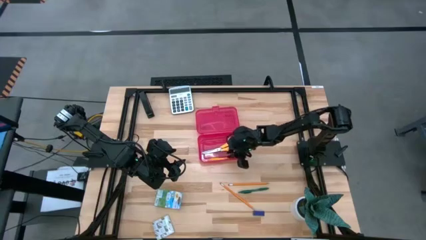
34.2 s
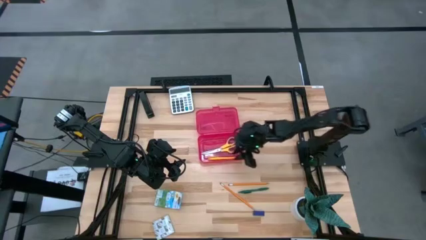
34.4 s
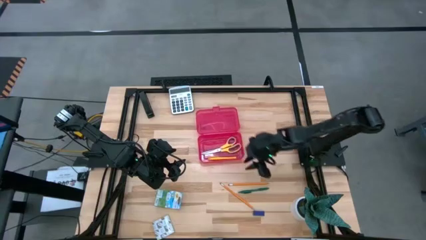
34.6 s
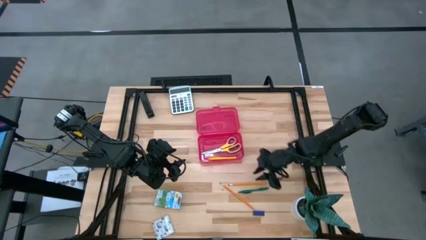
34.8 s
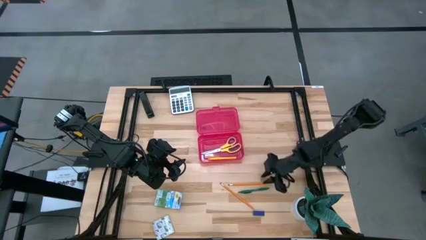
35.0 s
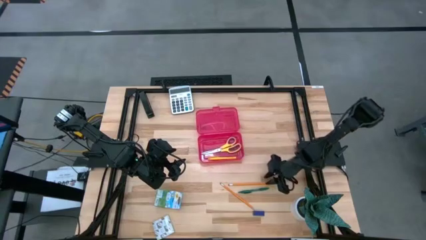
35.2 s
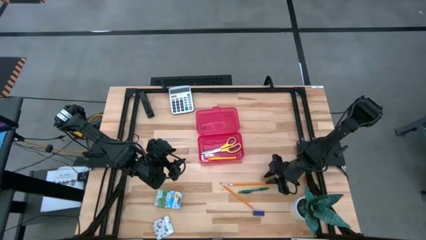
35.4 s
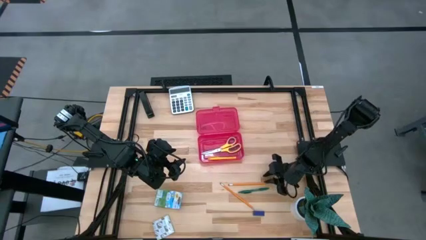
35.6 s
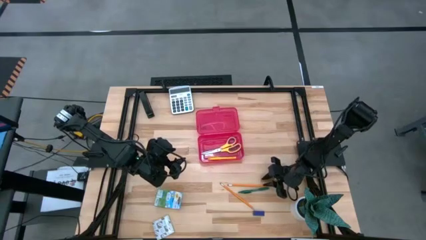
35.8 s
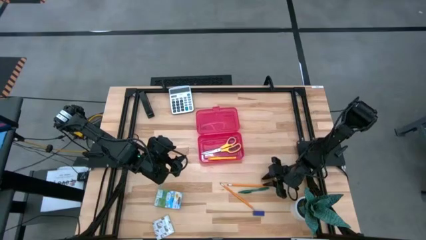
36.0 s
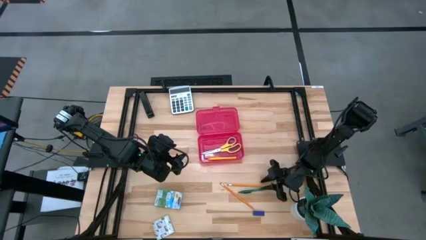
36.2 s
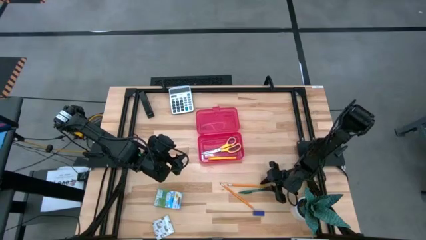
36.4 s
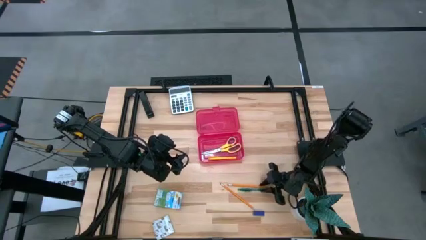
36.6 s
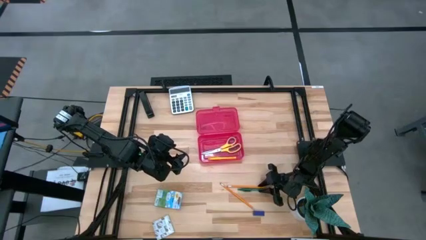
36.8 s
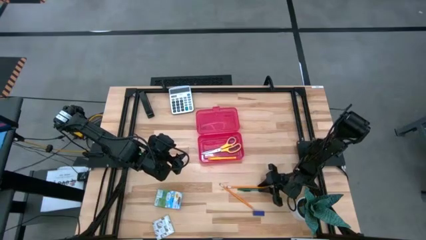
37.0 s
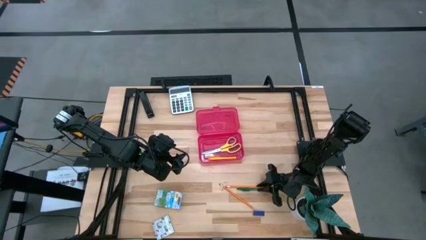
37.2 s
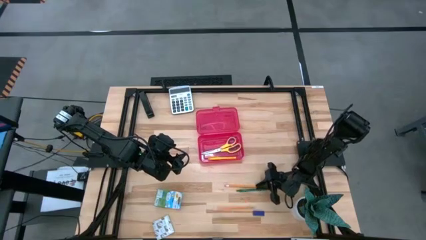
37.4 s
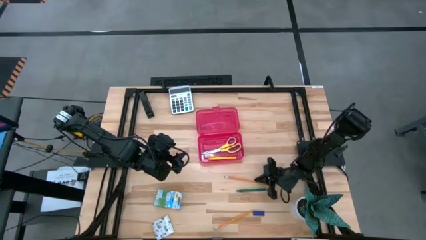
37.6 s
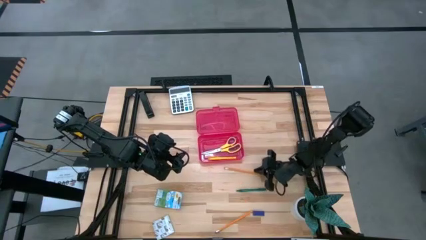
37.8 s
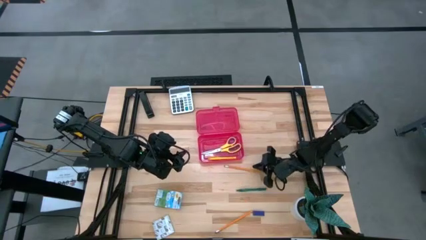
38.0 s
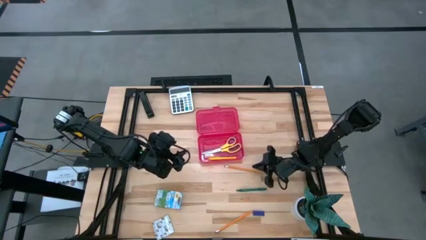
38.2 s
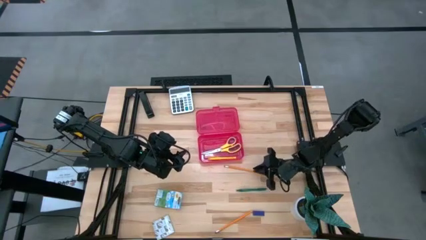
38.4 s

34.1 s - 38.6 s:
Task: Pack school essentials
Put the right orange pencil into the red supply box

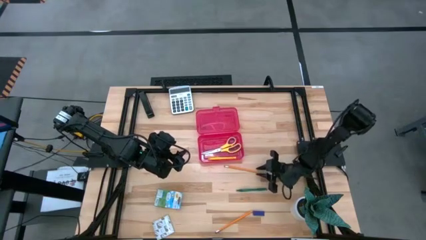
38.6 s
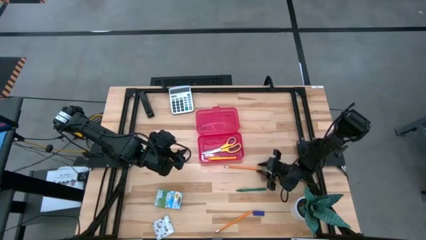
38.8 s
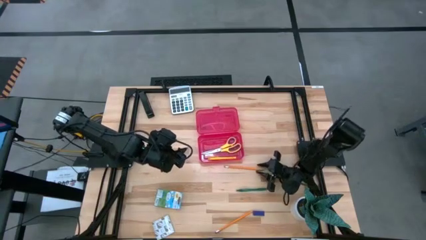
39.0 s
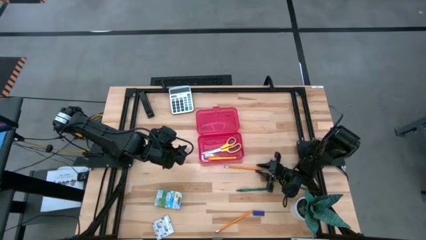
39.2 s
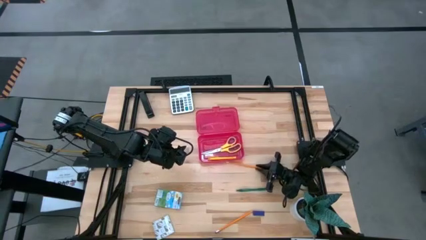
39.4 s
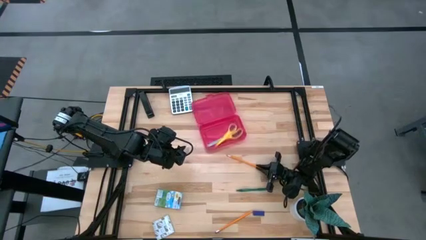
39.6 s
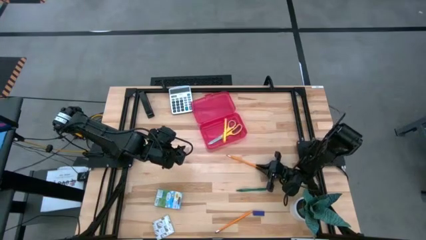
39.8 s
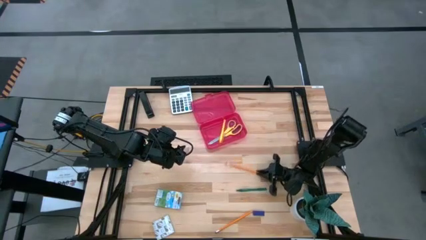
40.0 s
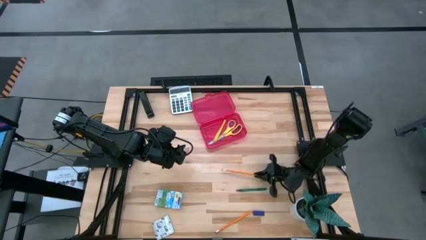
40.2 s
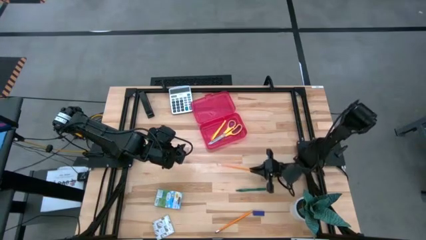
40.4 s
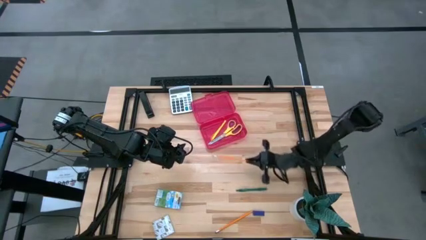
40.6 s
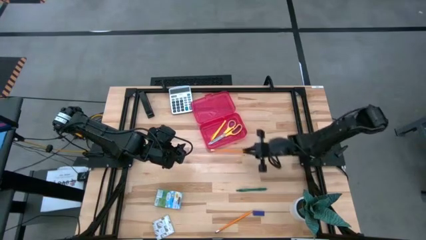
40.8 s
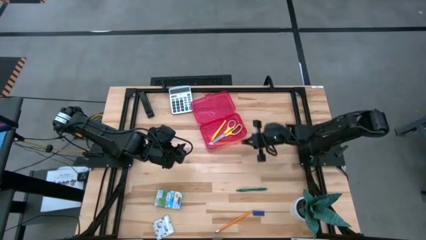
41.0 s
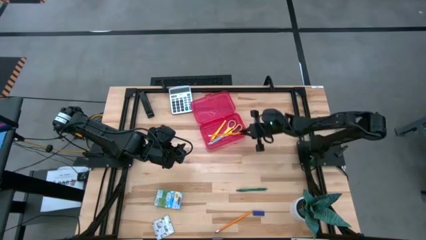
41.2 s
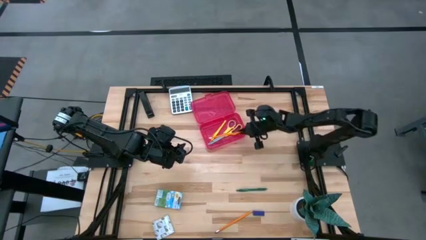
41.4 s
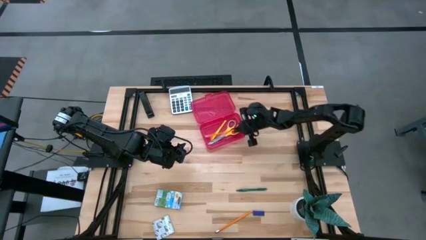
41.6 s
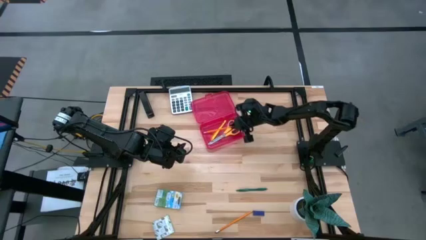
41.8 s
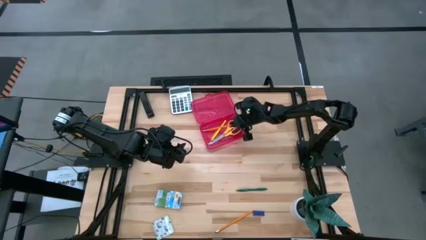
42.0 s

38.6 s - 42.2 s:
Put the right orange pencil into the red supply box

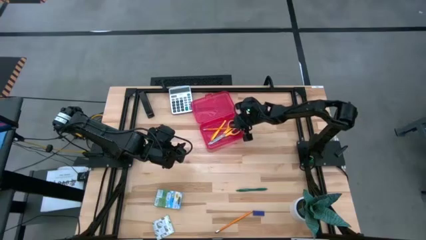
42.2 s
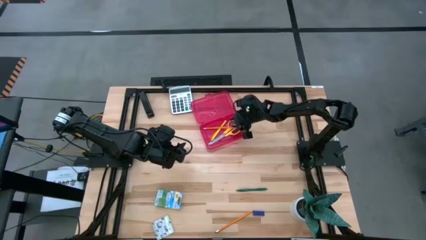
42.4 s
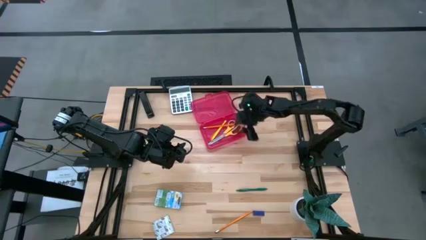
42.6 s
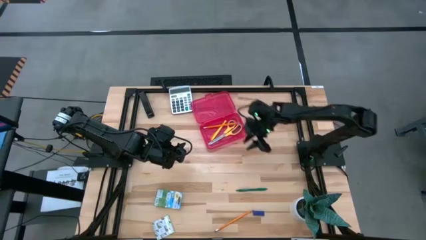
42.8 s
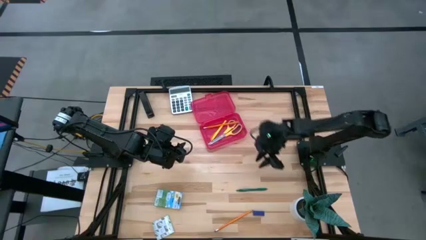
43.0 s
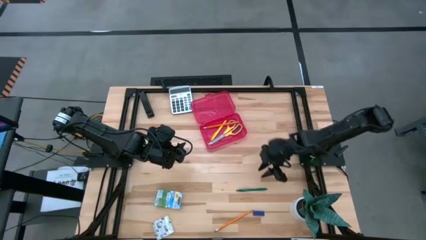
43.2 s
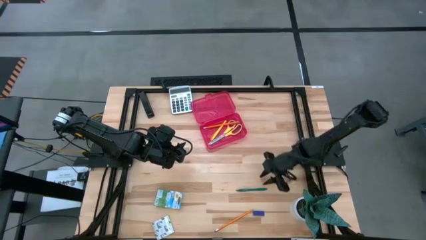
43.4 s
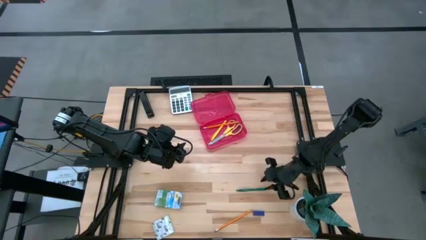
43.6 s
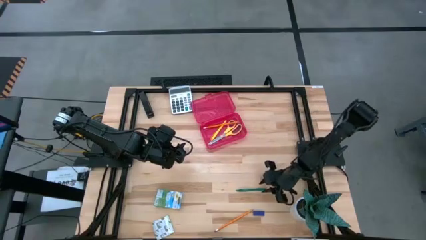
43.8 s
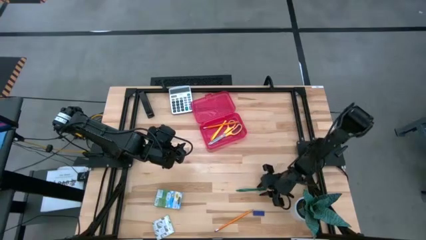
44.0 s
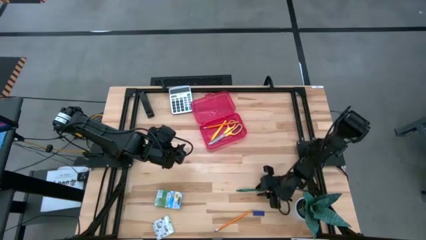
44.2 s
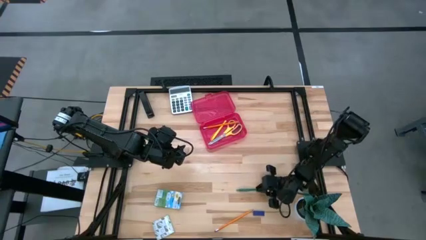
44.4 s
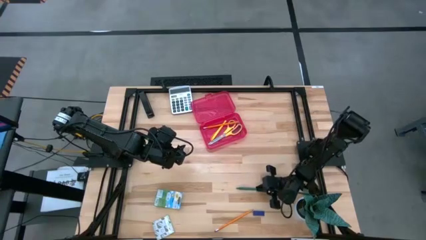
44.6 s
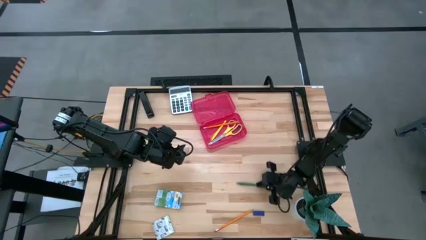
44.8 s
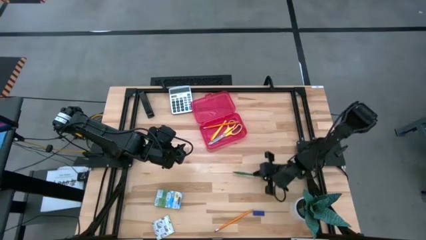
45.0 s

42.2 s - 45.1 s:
Put the green ballpoint pen into the red supply box

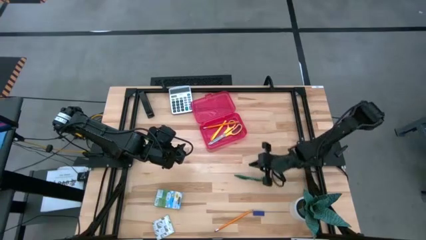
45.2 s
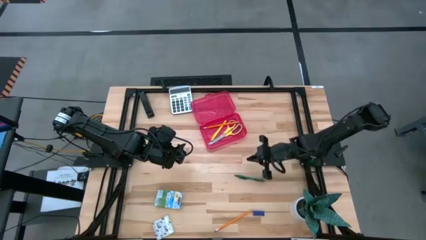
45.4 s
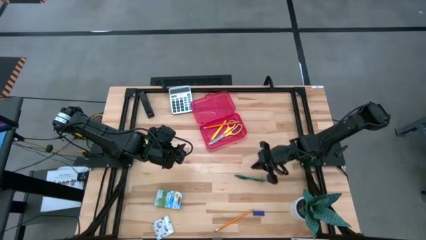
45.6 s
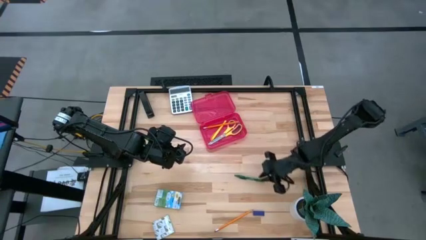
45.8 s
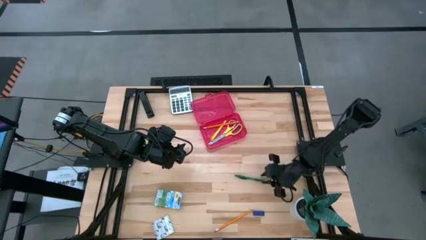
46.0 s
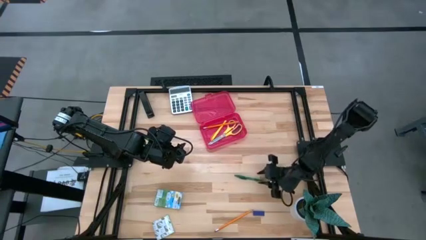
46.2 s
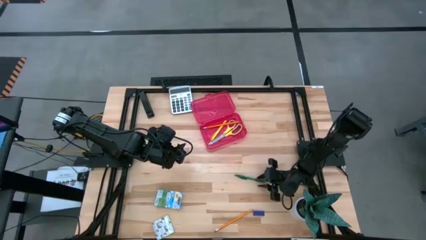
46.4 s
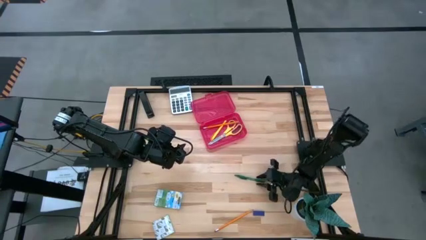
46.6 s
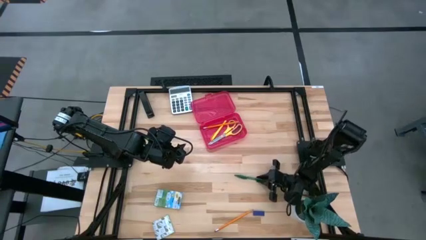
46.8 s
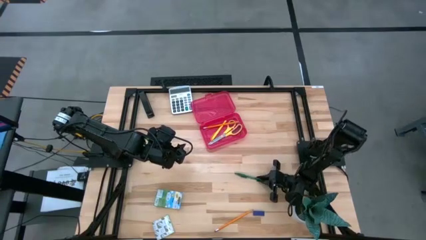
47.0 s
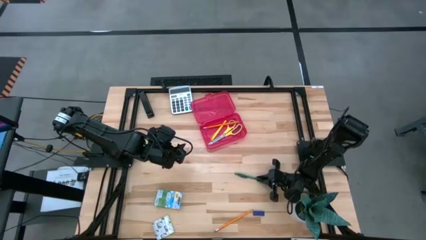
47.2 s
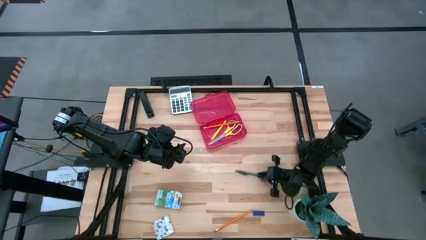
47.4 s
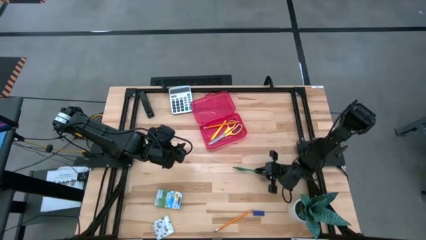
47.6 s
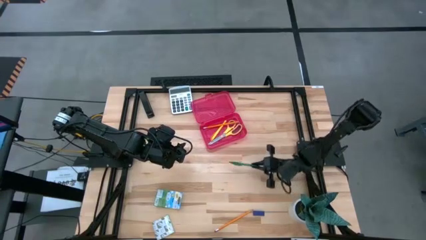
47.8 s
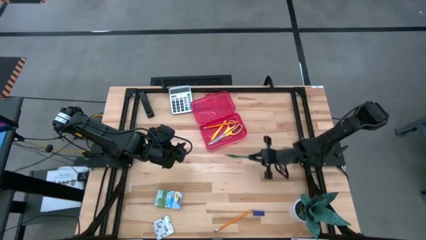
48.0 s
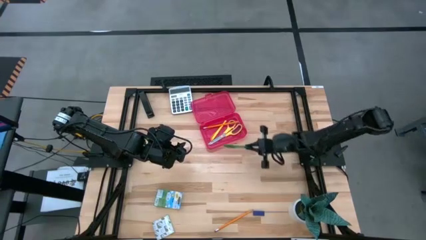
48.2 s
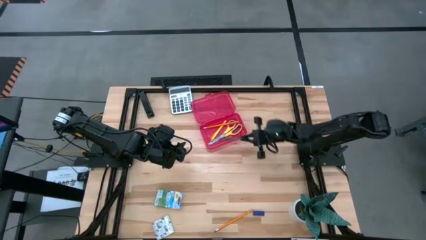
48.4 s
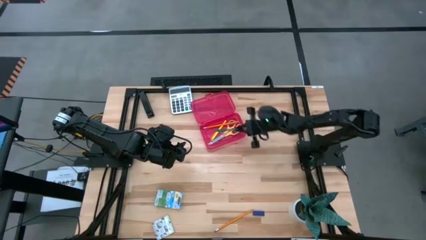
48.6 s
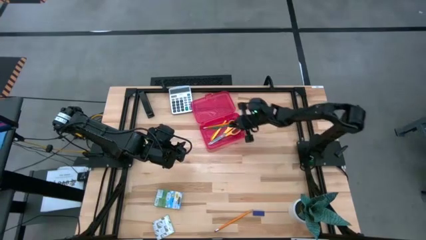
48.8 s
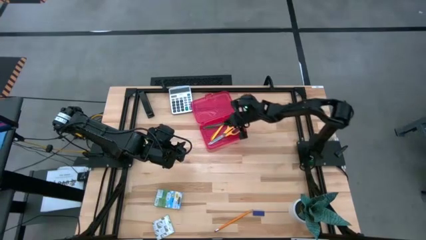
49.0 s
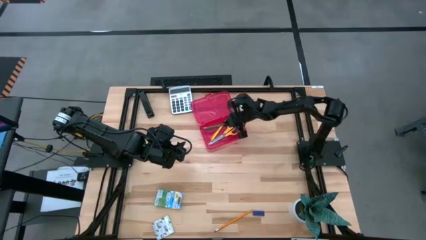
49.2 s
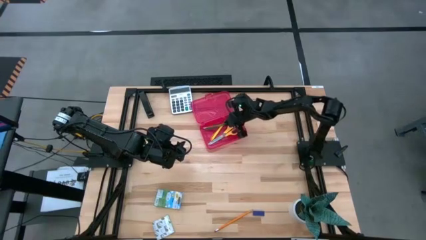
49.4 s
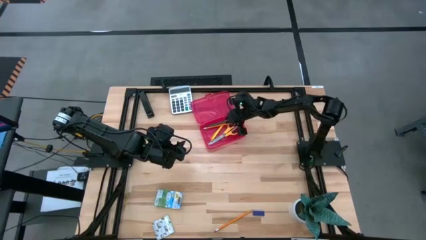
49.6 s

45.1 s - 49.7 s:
Put the green ballpoint pen into the red supply box

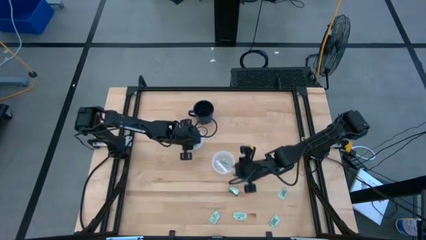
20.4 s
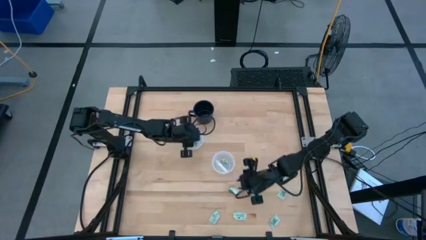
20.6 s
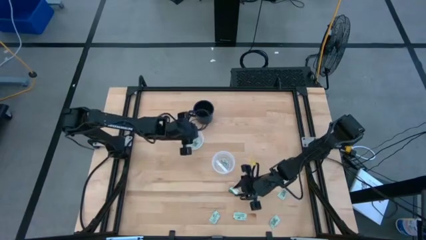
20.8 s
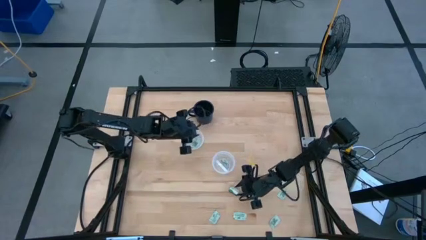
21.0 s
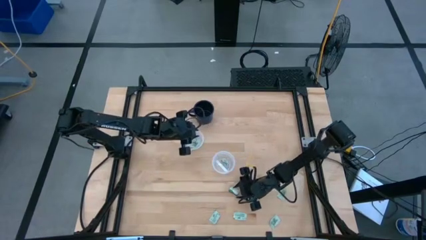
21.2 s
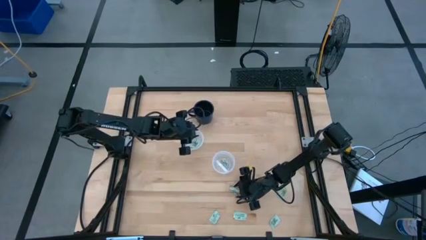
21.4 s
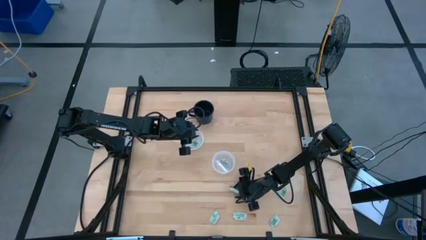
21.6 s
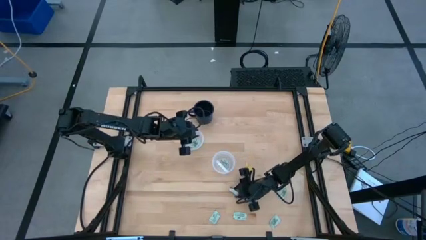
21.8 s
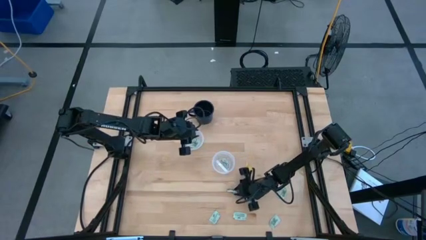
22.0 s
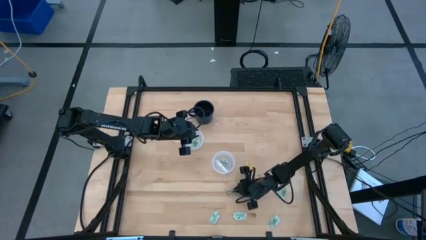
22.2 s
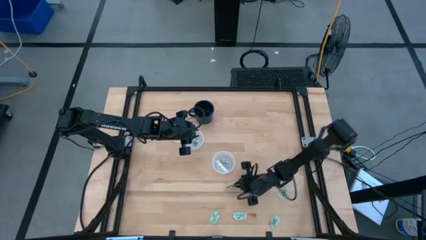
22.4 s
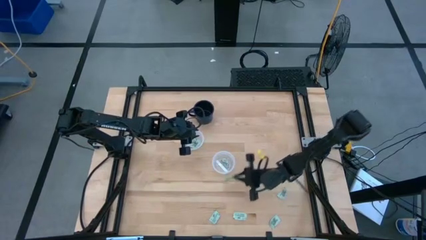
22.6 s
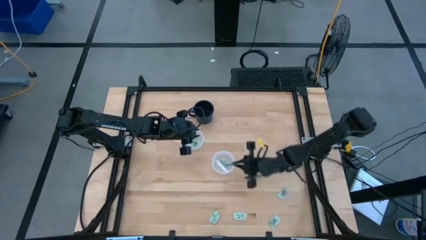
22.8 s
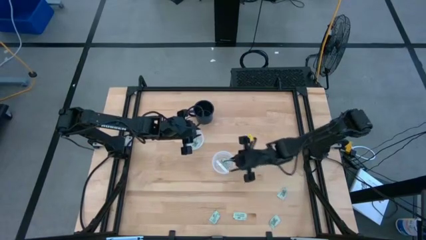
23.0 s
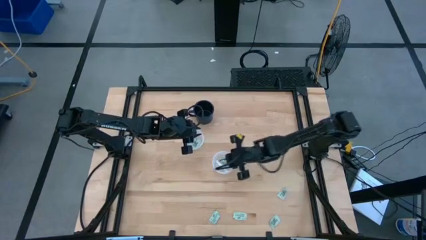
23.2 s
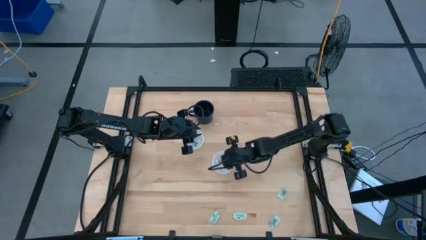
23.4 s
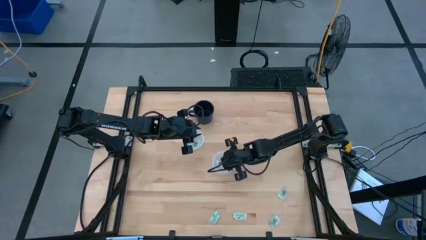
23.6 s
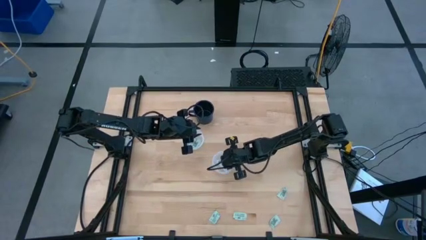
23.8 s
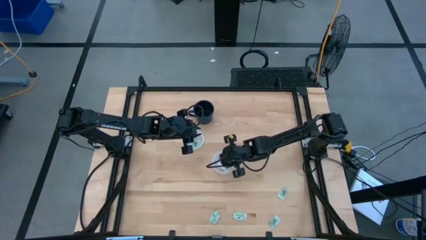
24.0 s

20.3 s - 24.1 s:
Task: Pick and place Stevia / Truvia into bins
Put the truvia packet into the bottom round transparent container
